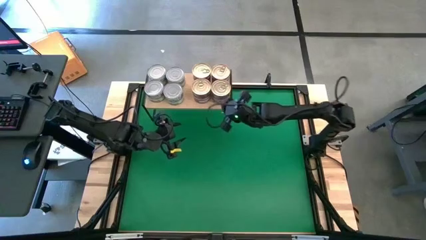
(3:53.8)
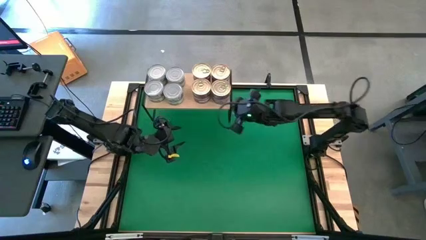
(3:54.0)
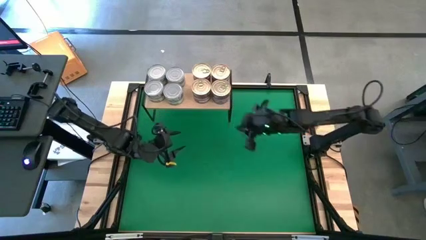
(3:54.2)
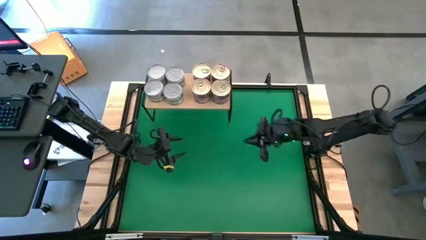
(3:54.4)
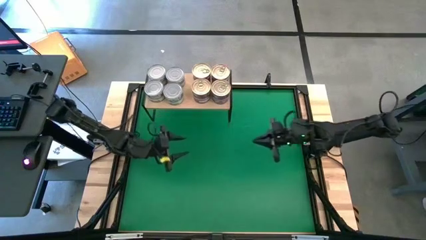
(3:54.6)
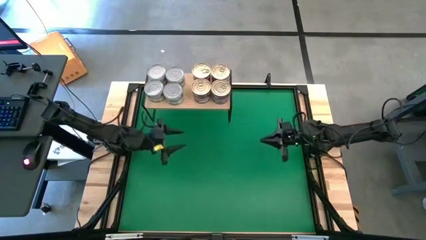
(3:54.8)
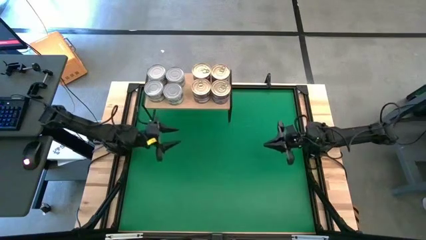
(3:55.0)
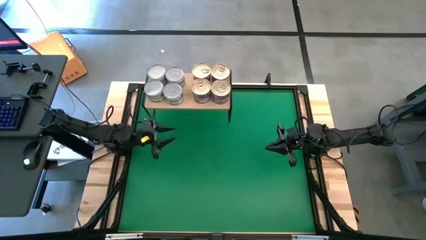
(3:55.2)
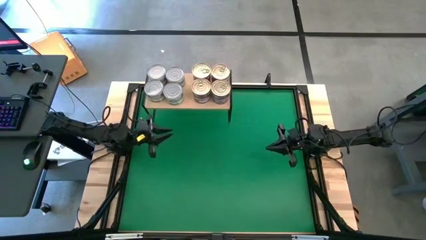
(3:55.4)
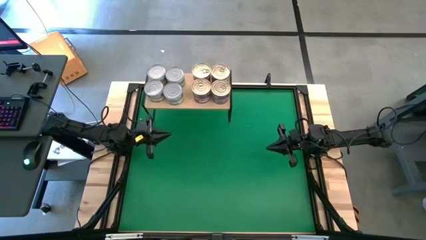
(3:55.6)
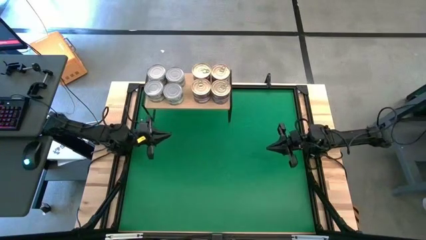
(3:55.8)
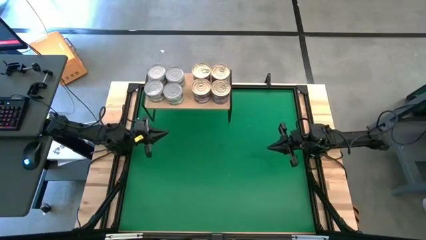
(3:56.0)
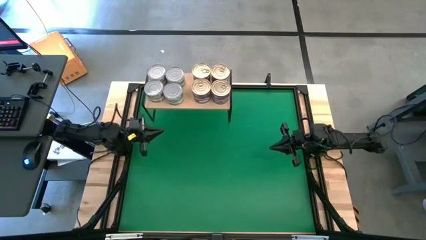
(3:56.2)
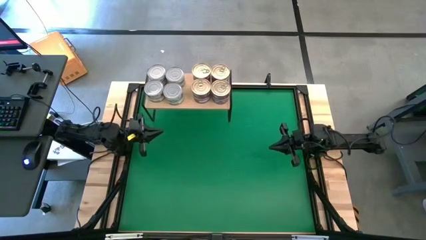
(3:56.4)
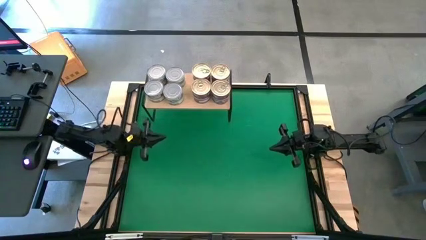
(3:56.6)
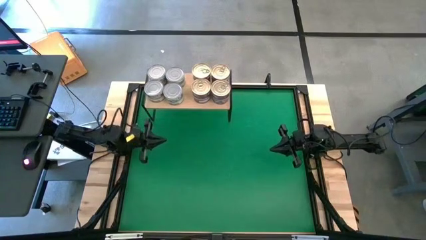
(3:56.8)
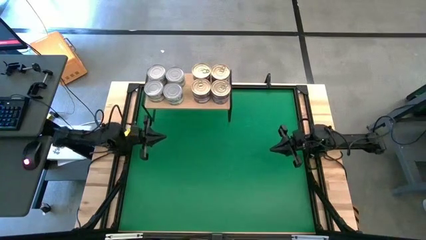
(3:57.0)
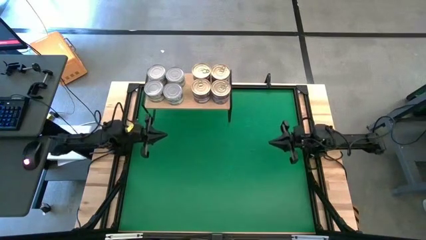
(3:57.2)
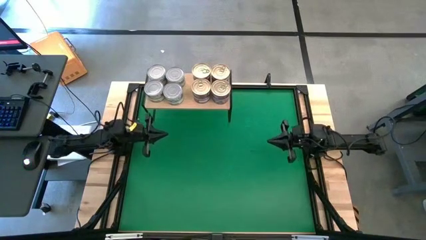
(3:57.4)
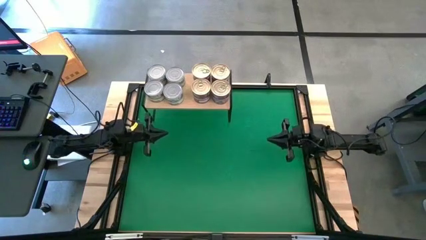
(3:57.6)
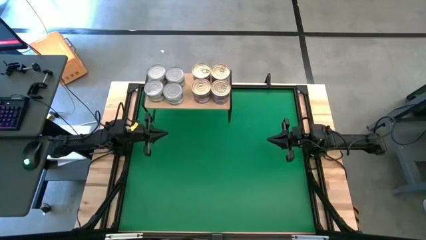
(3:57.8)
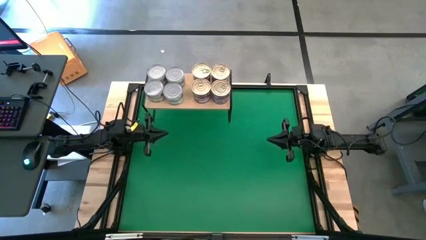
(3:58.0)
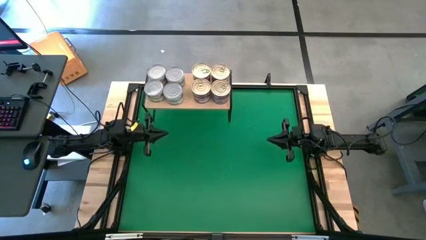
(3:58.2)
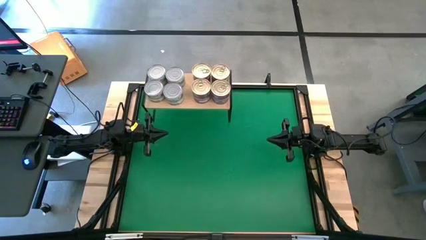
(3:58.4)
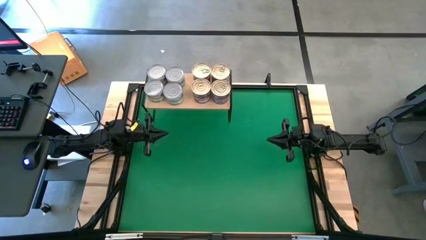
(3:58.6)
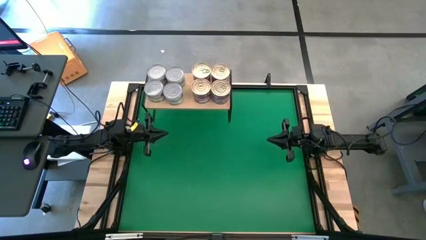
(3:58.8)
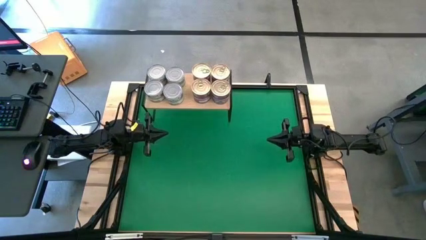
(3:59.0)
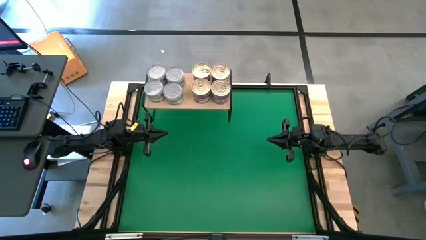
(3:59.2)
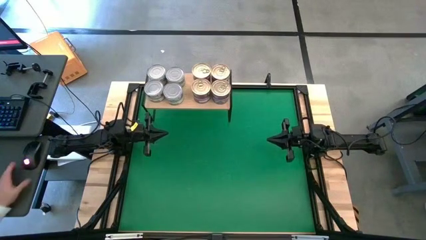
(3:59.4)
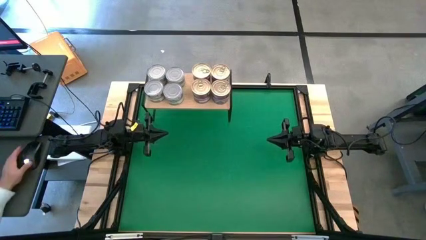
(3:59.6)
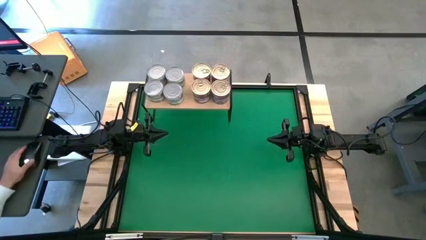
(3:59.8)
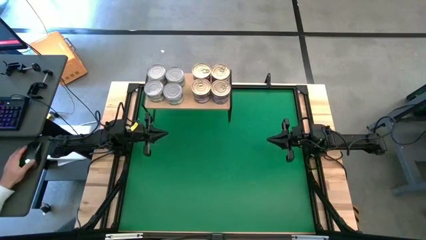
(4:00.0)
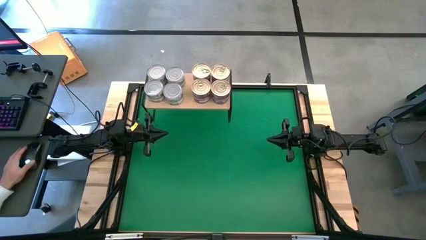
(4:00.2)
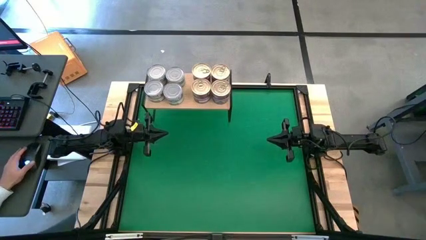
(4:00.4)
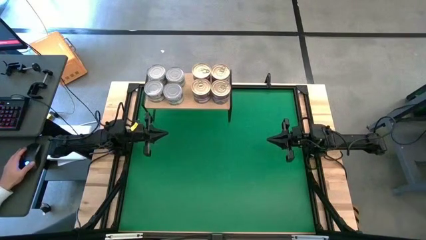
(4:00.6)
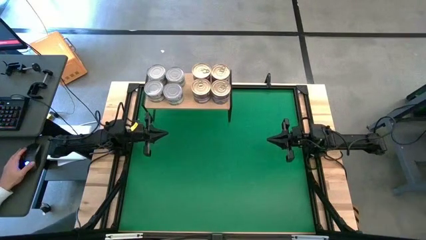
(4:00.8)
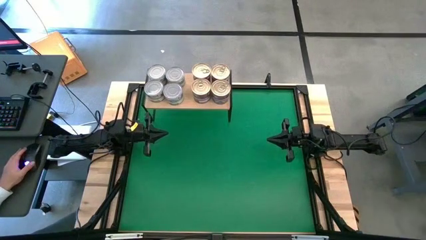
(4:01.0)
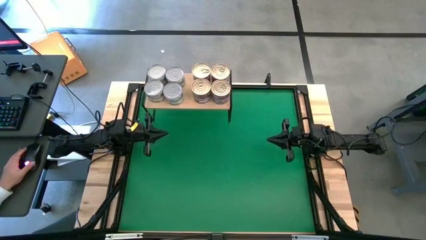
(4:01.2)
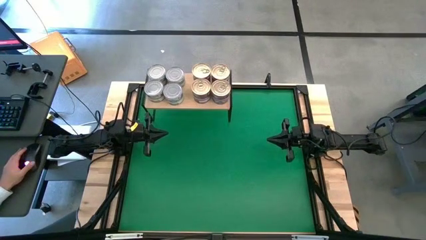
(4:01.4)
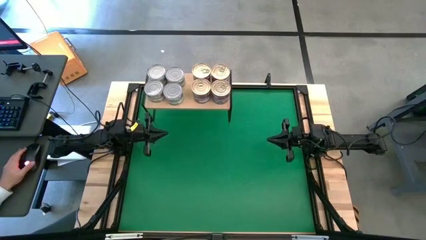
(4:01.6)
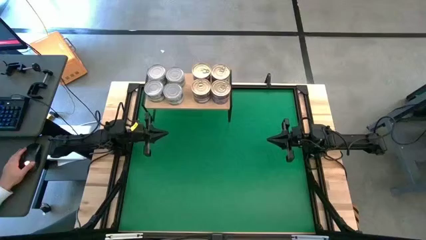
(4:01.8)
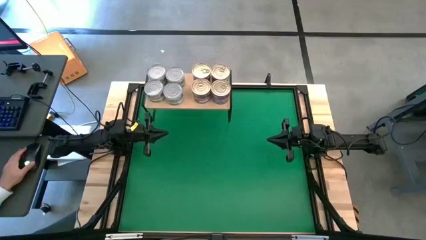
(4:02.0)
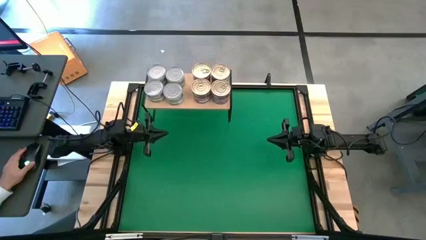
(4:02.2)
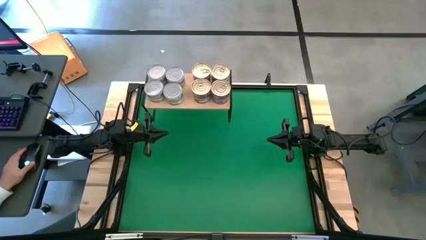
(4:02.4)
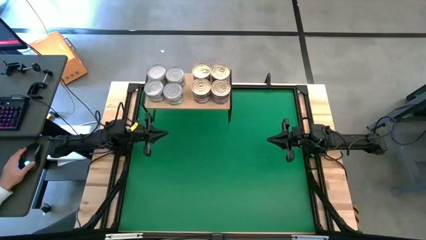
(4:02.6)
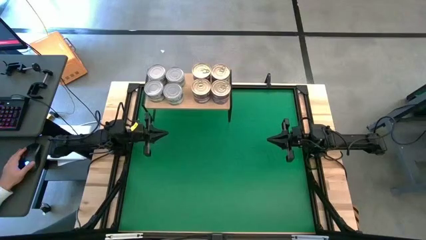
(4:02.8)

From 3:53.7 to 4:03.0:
Task: Stack canned seafood by type on shelf
Return to Home Position
